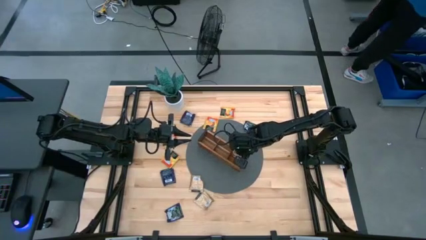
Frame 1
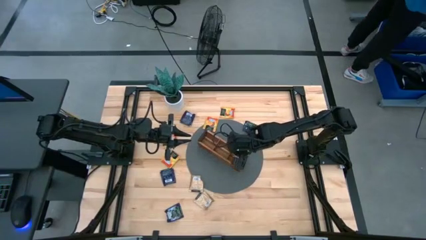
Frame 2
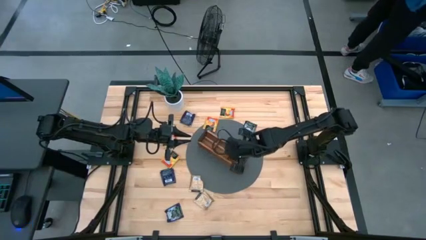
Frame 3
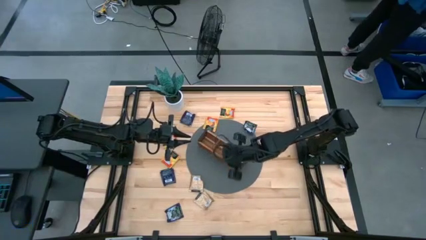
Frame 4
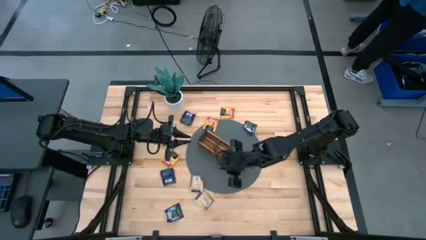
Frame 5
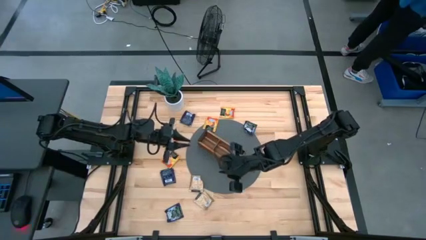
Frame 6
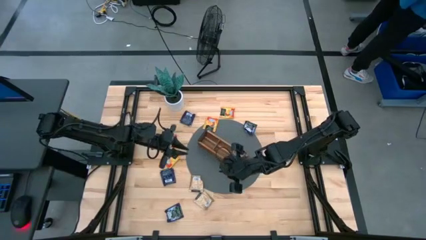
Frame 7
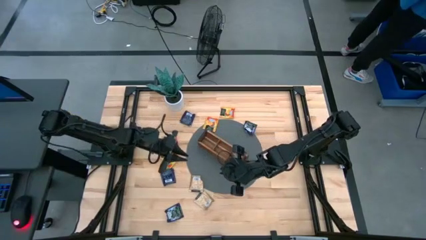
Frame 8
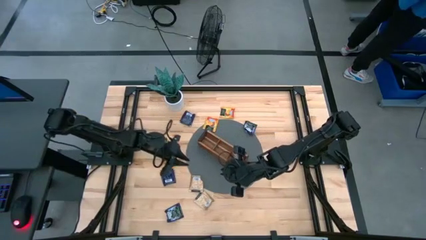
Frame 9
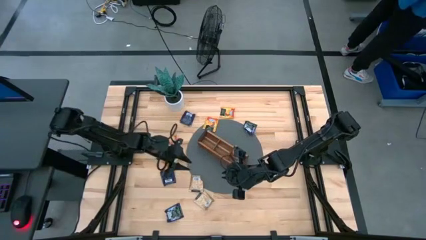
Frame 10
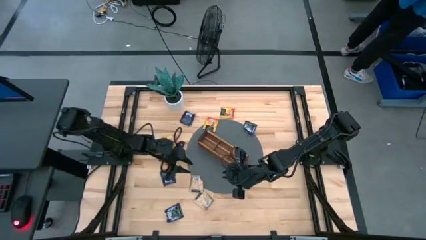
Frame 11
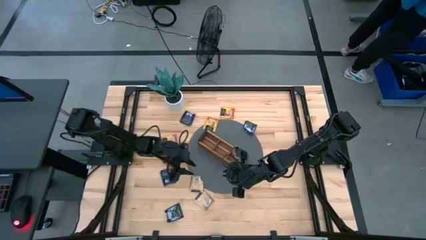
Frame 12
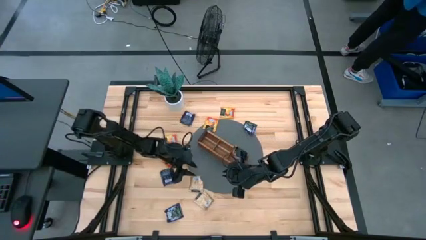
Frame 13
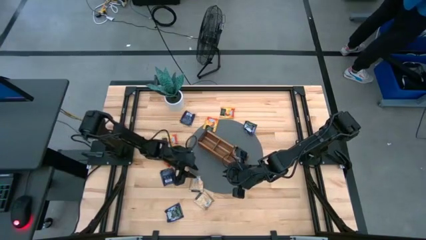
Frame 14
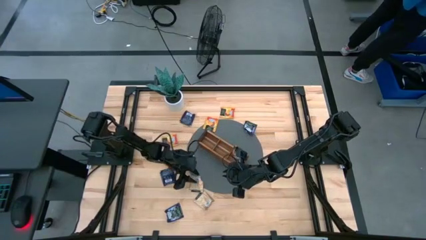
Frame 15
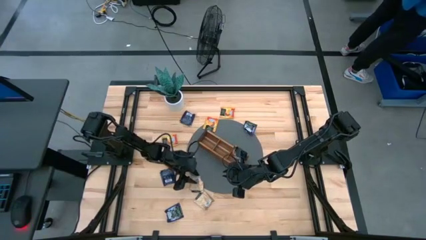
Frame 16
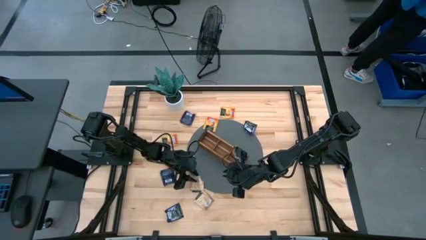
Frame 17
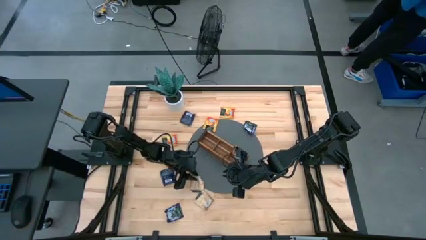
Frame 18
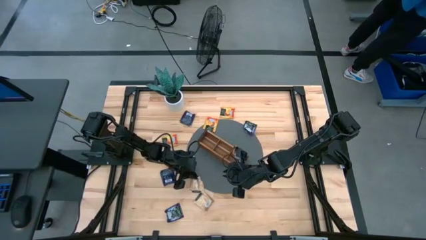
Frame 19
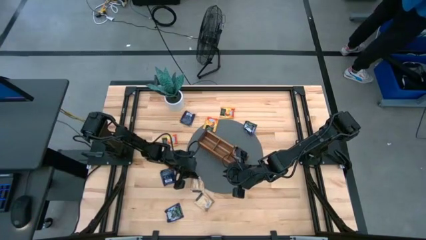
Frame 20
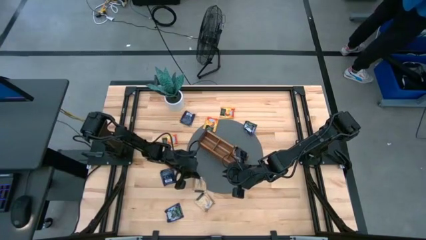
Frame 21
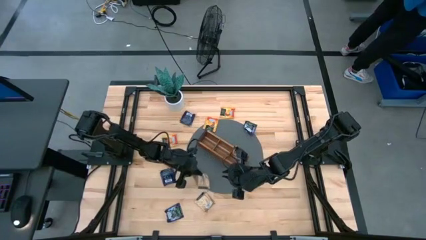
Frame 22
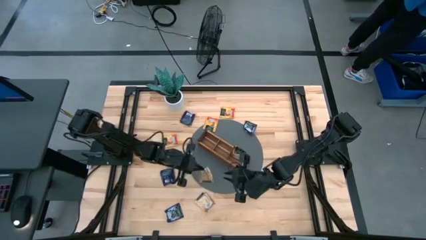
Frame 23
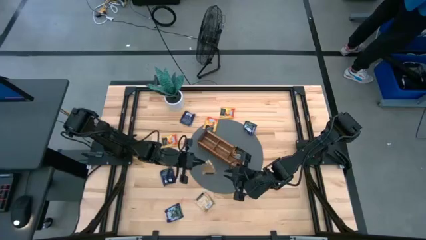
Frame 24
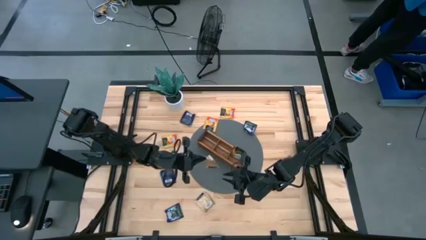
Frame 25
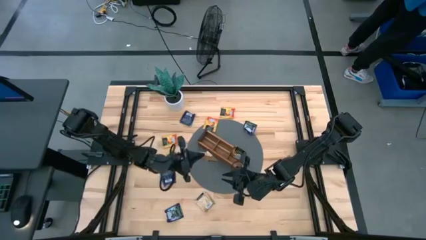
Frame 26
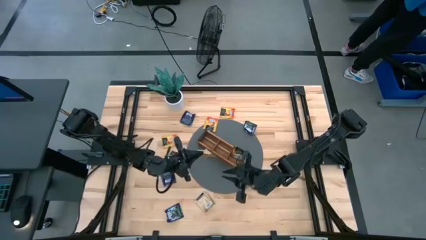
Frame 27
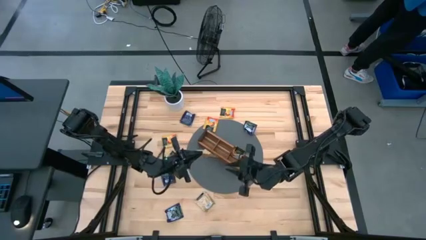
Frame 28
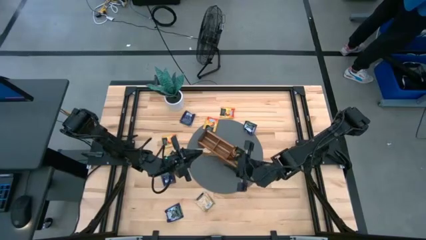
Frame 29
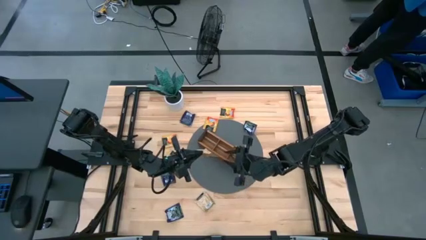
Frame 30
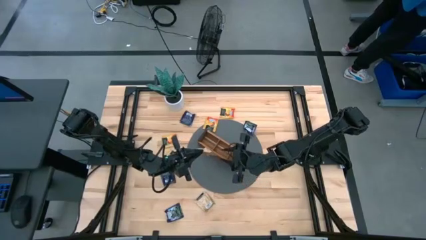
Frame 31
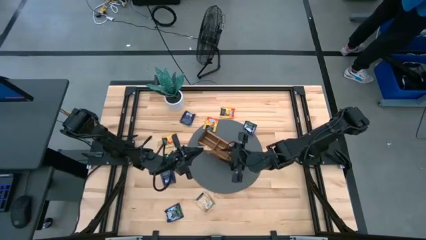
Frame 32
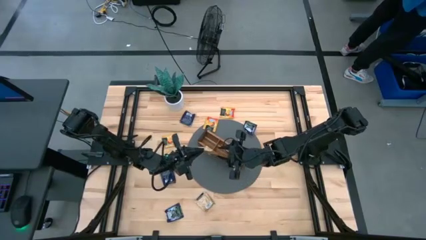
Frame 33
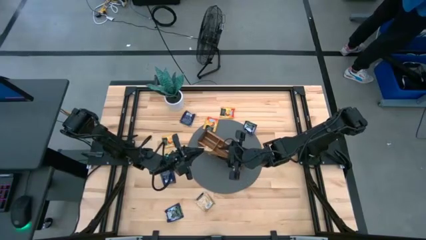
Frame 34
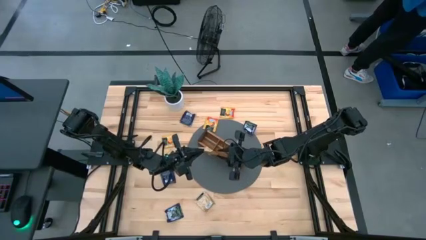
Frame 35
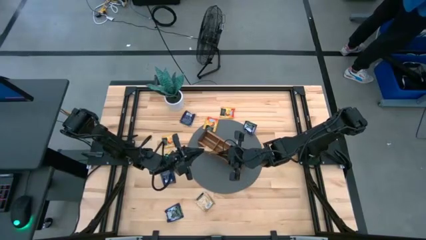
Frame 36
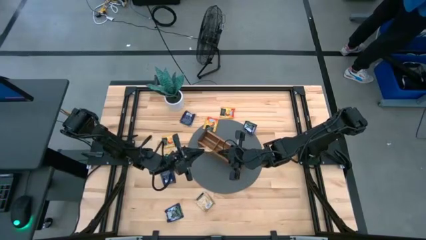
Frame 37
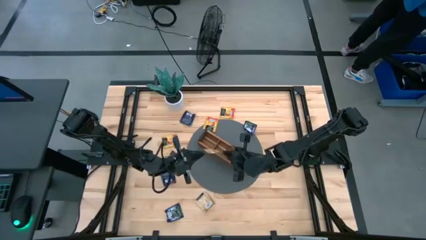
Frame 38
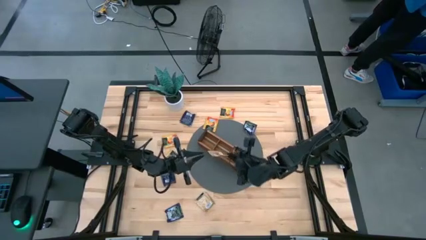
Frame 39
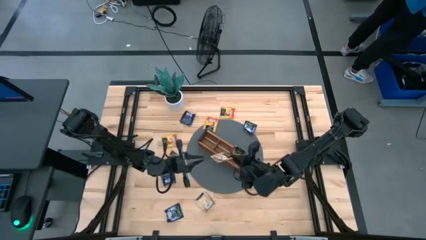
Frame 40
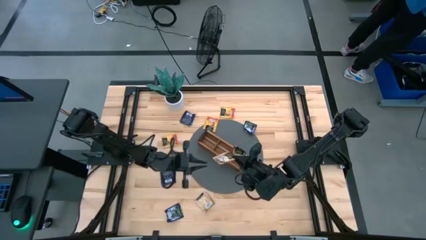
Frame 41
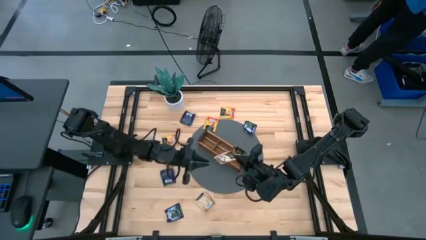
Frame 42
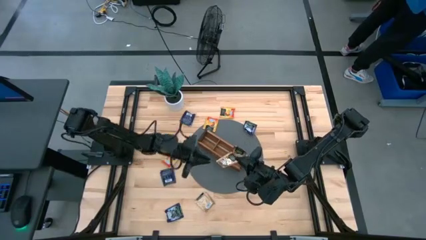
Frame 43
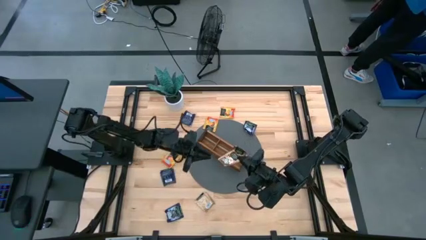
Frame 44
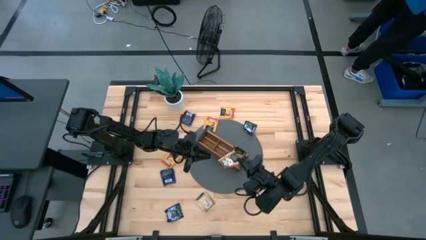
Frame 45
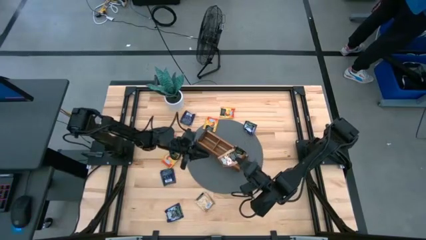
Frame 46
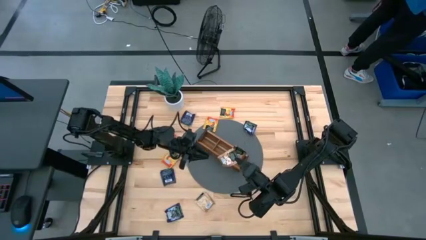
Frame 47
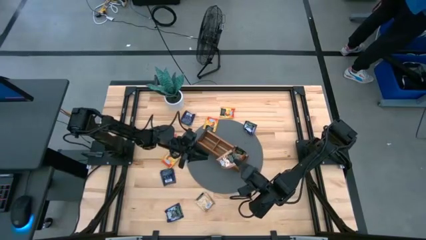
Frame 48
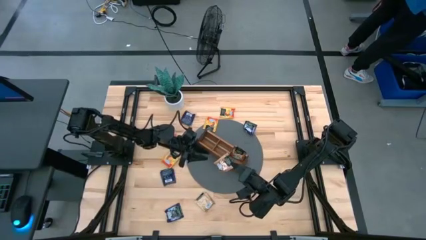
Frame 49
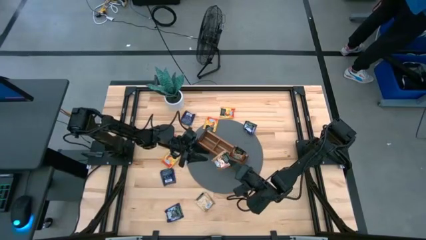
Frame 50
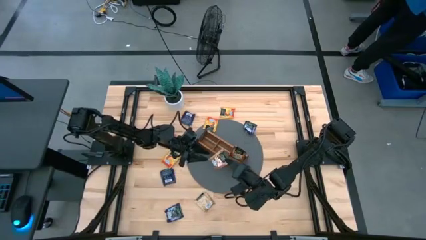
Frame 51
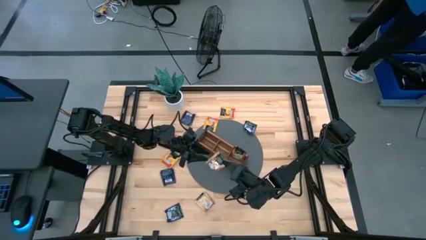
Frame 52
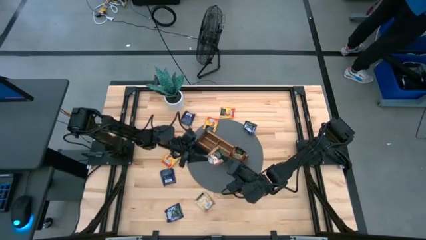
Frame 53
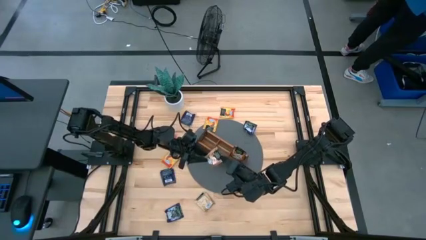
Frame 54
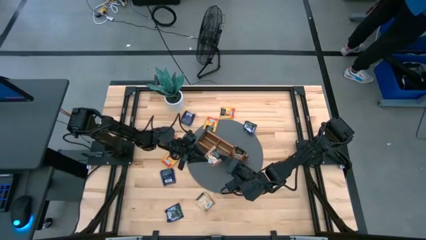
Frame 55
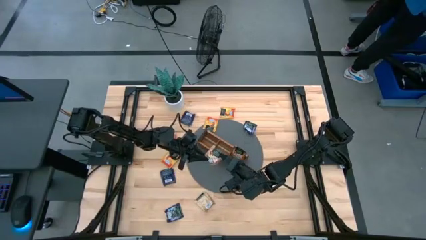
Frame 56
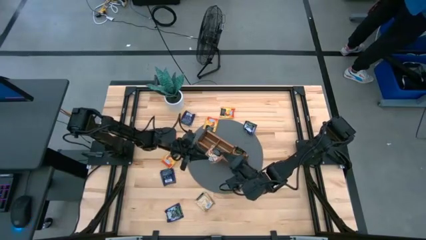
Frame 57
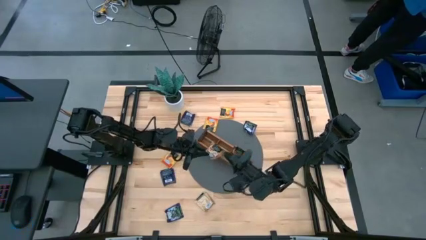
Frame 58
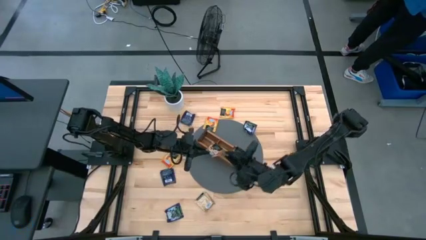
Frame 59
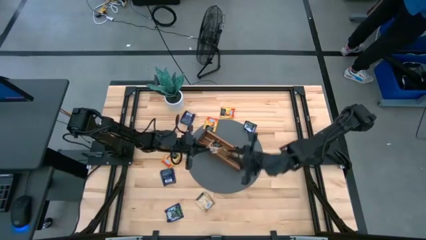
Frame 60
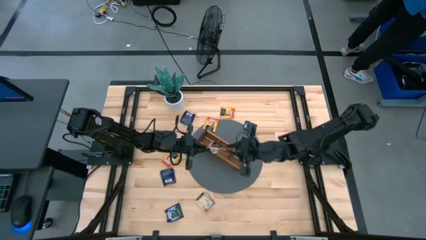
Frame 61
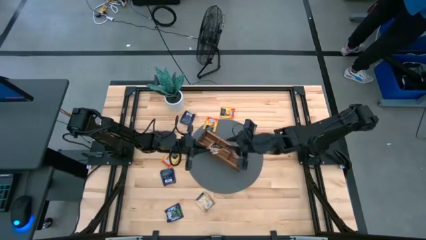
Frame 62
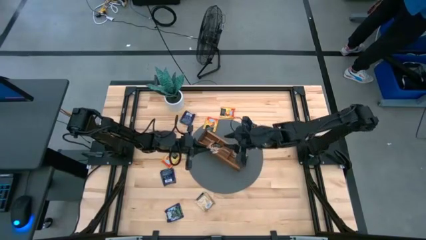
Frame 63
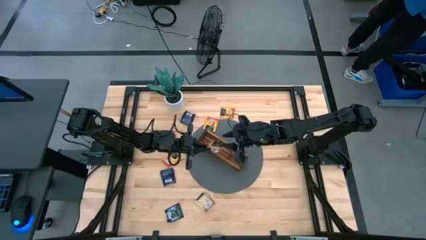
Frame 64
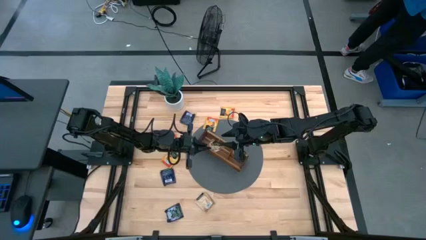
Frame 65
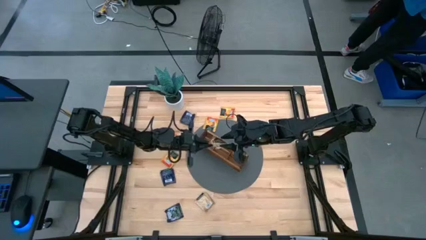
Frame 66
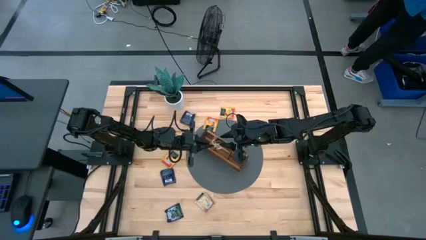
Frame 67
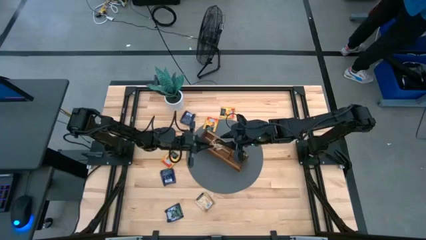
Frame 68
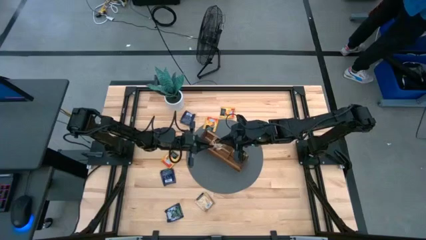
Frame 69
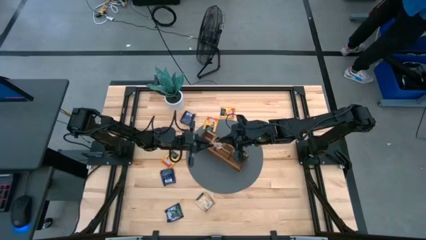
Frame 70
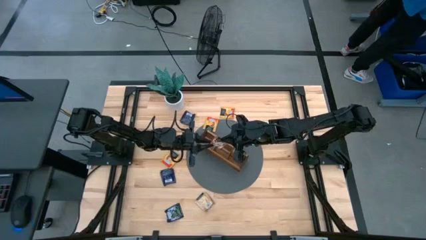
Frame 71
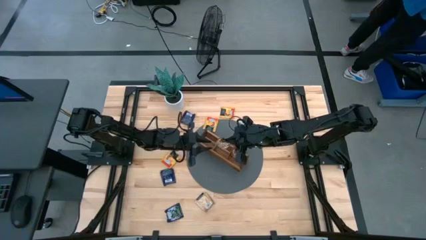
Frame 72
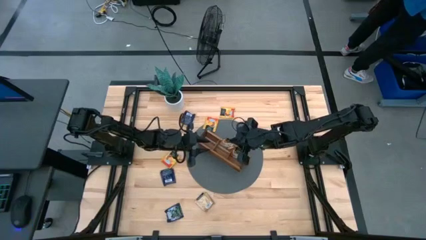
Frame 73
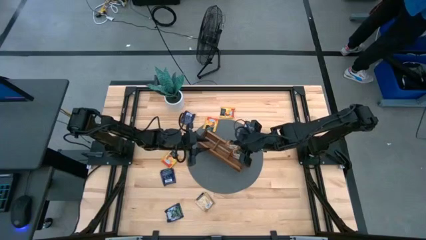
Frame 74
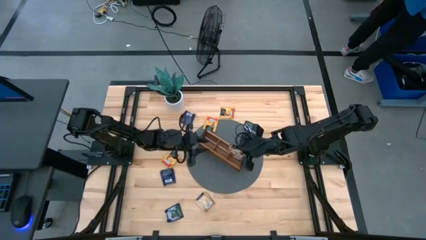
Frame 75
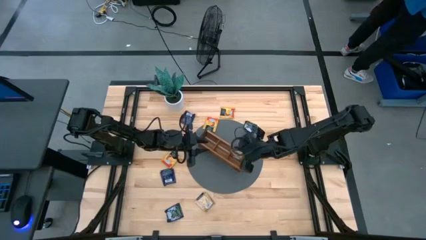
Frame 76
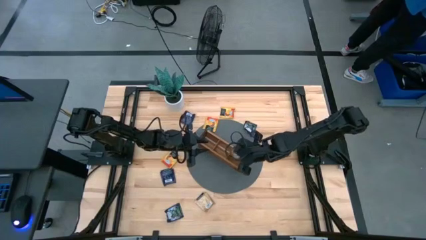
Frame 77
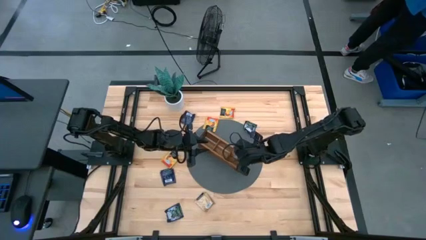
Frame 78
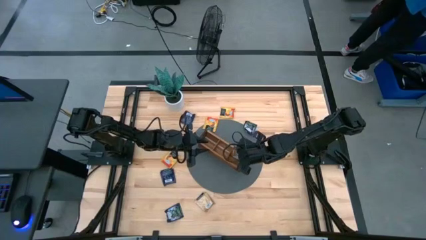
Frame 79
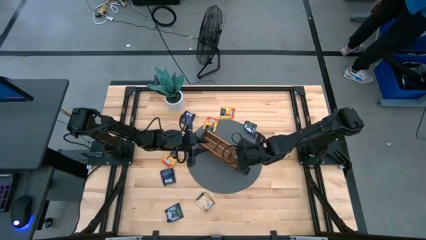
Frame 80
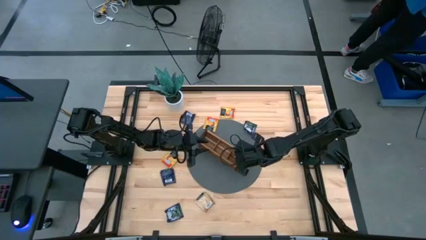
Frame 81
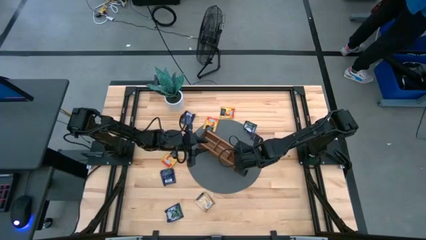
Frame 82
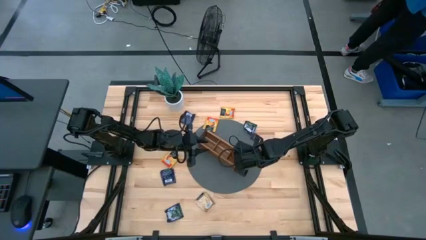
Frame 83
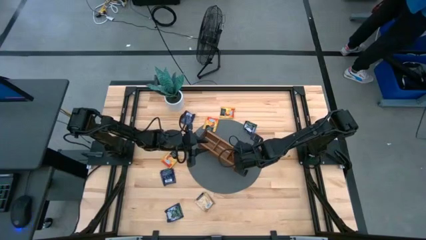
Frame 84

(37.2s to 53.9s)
Task: Pick & Place Tea
Put the brown tea bag into the right section of the wooden organizer
